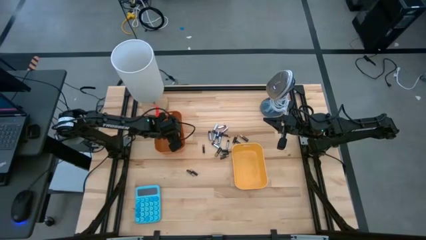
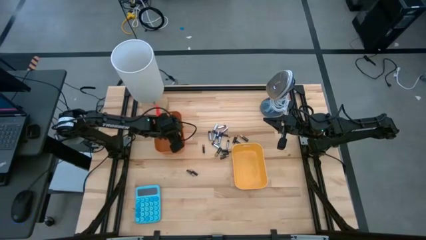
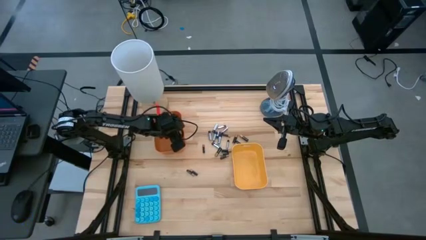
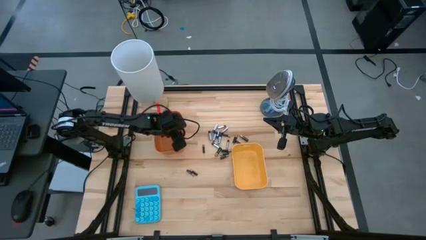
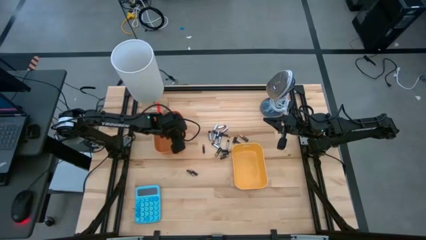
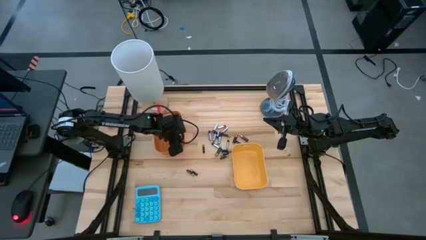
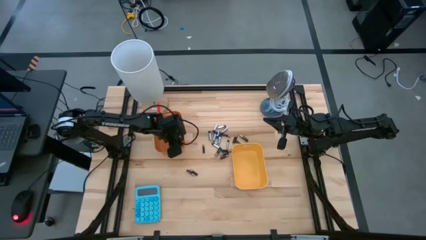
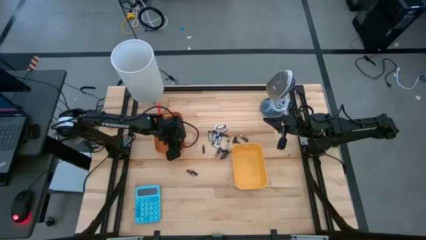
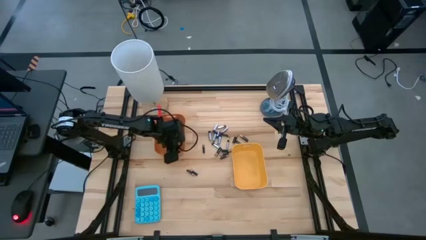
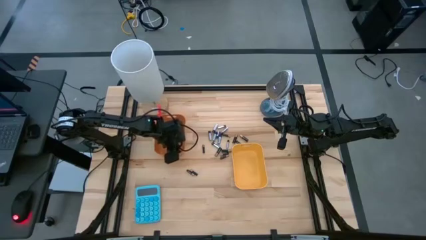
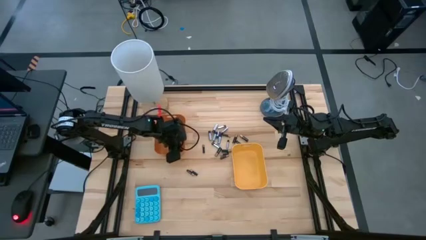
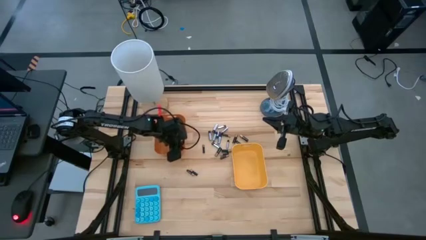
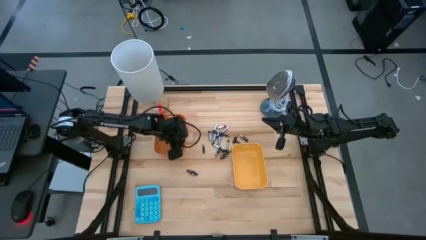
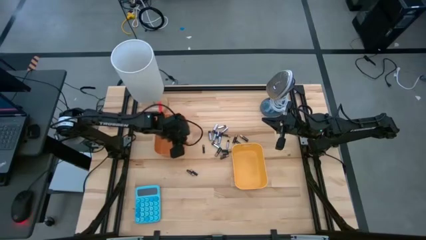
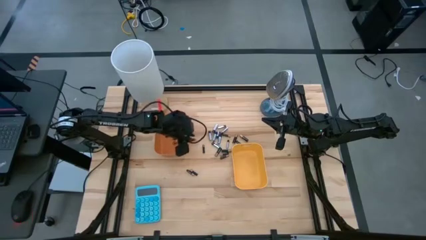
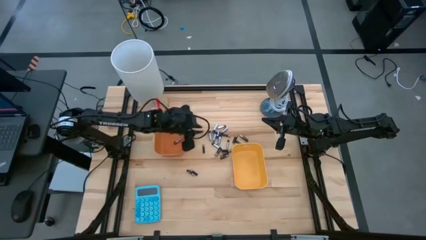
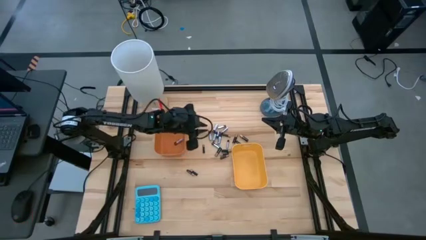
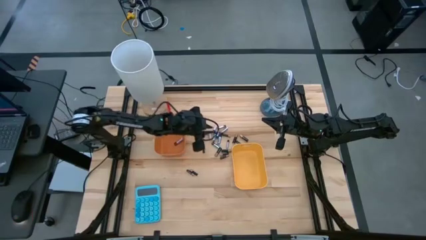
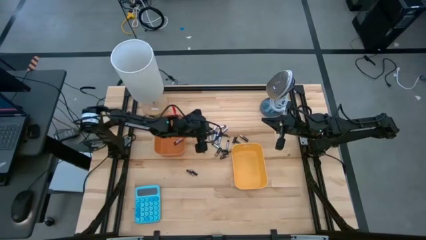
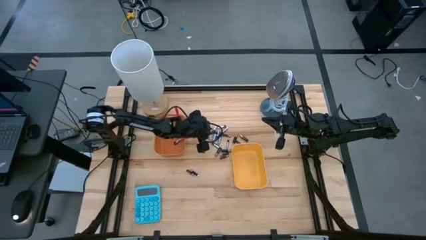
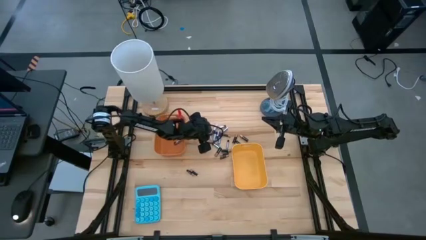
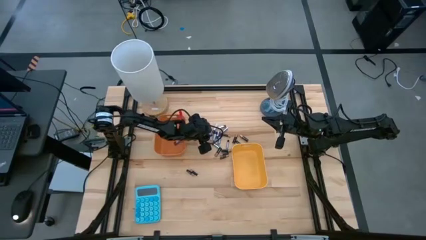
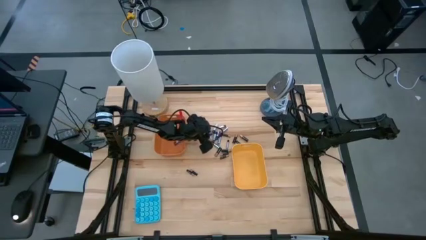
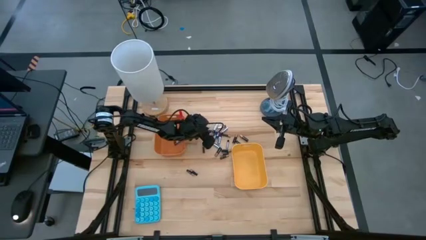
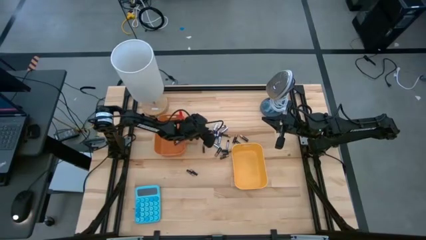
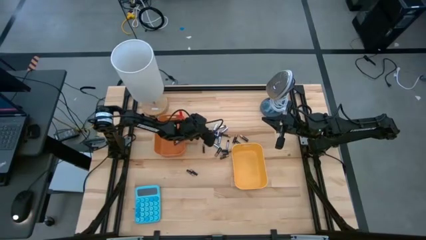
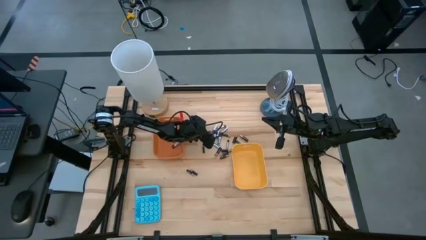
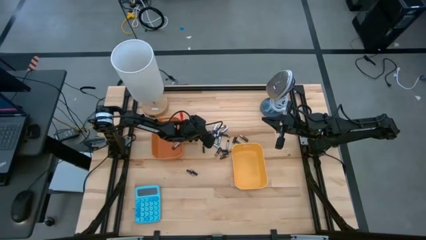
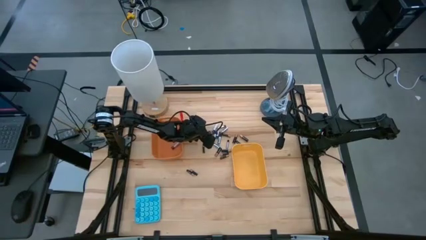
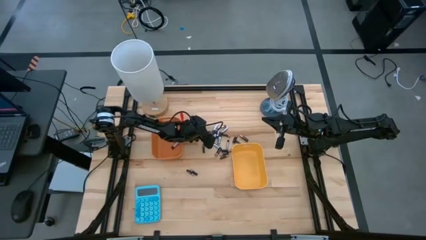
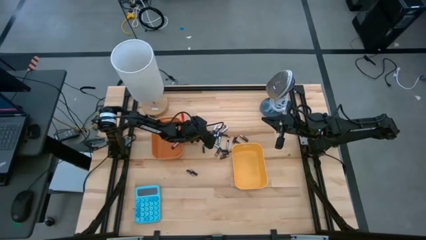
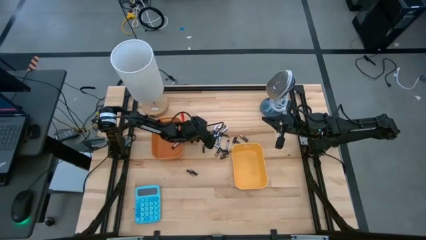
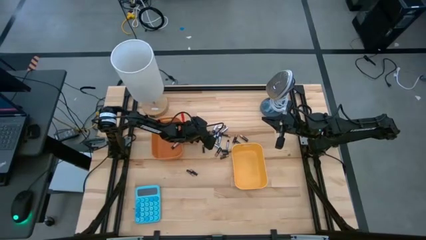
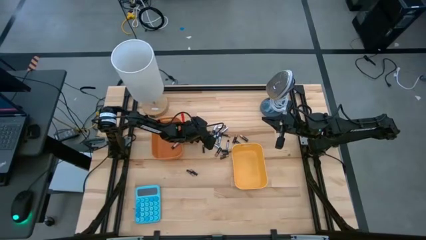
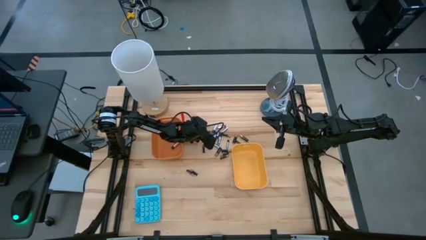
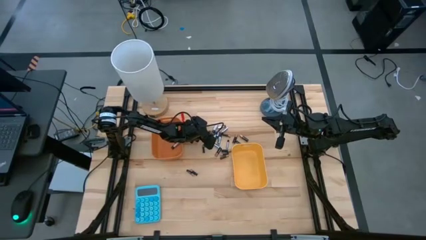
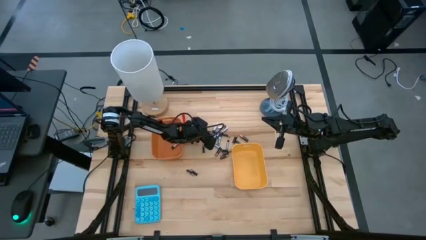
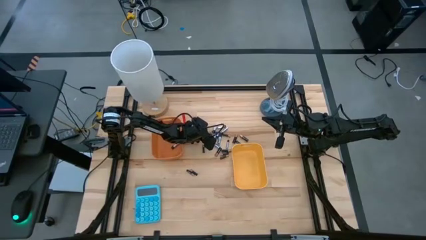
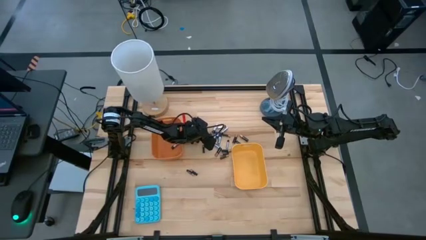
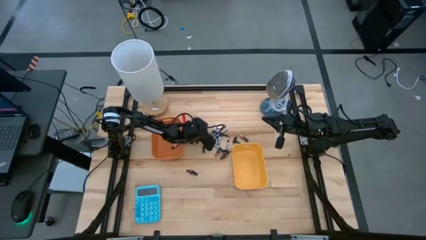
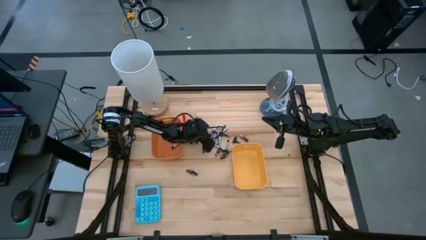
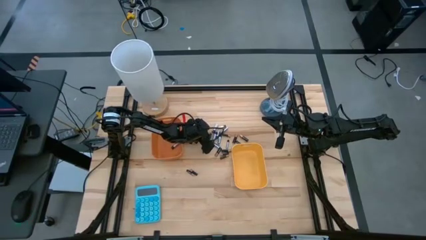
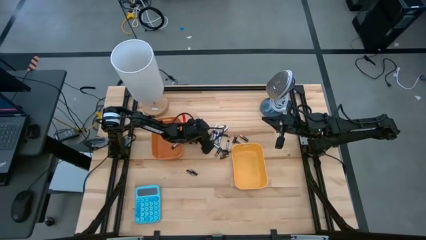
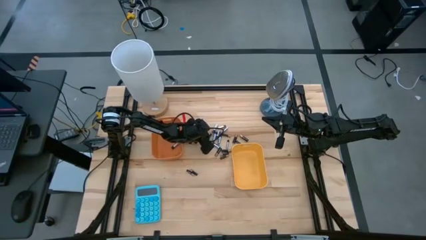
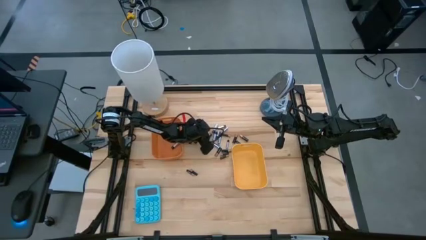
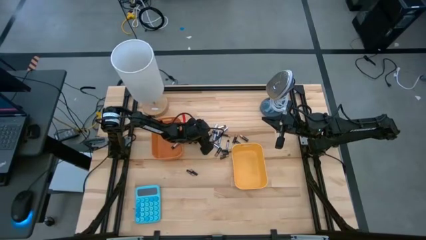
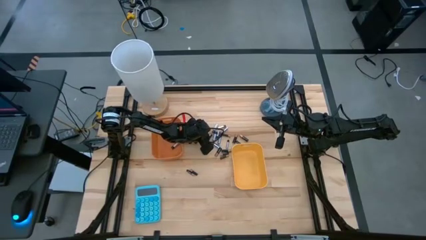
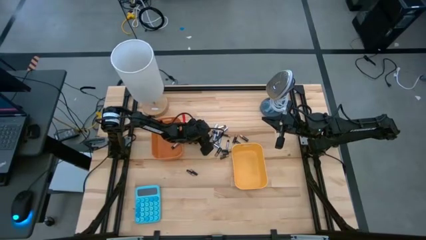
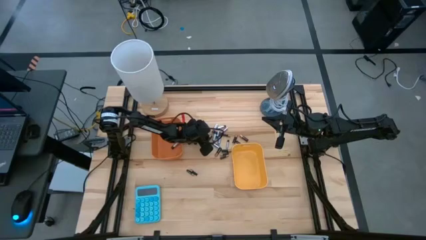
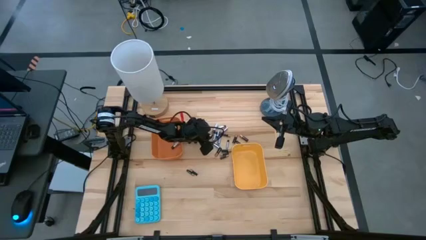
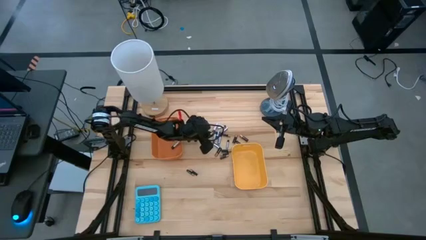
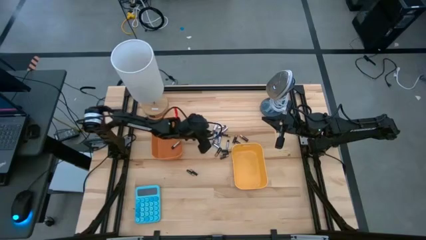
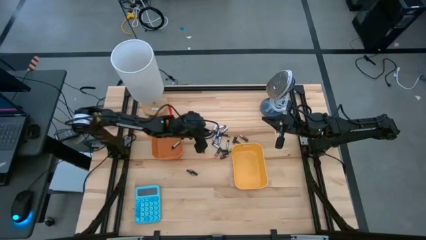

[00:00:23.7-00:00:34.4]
Task: Sort batteries
Put the silver battery into the orange bin

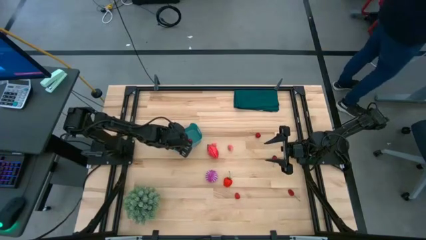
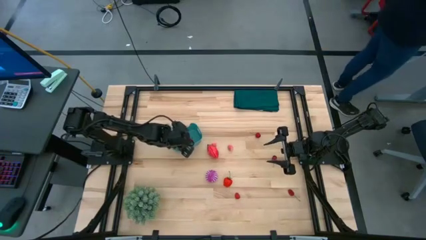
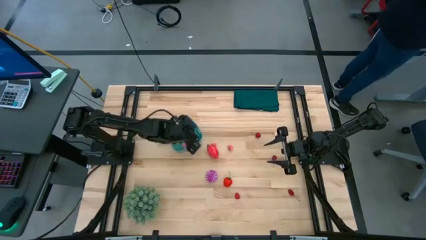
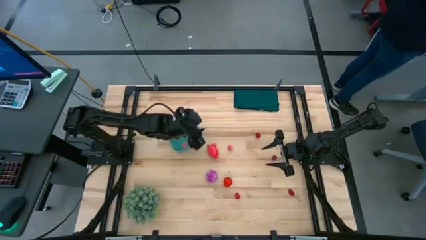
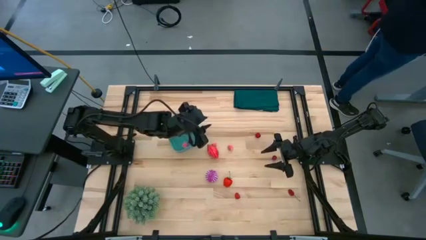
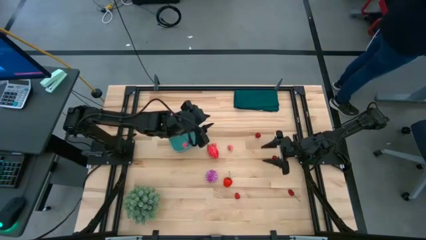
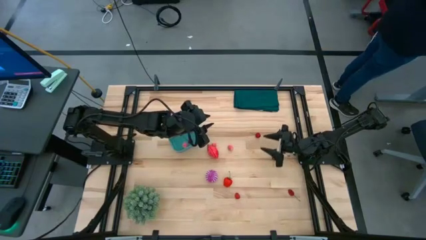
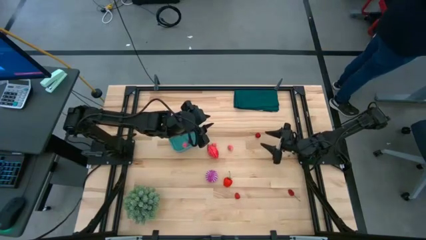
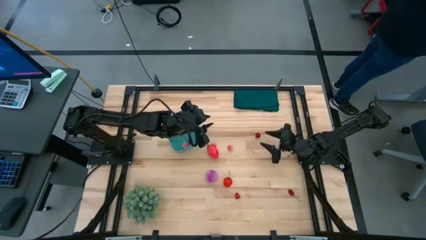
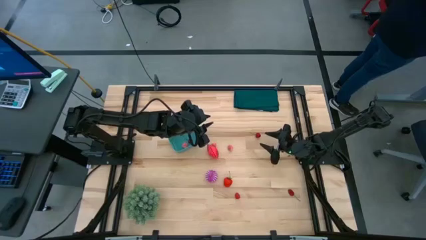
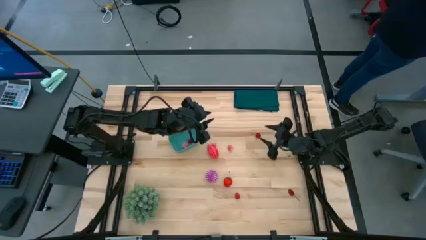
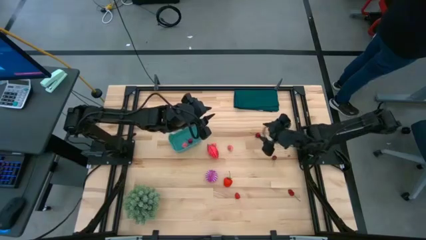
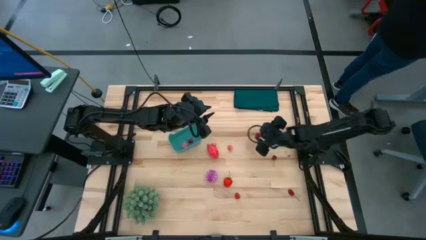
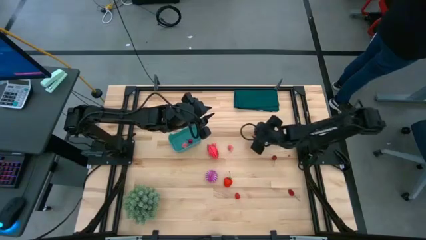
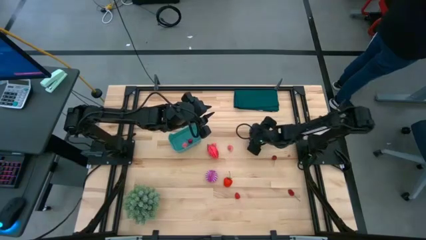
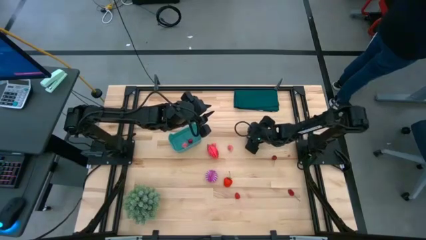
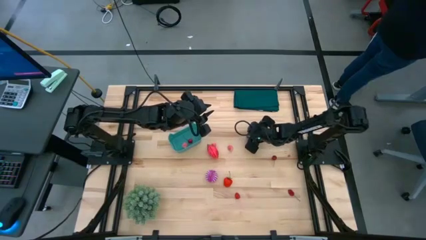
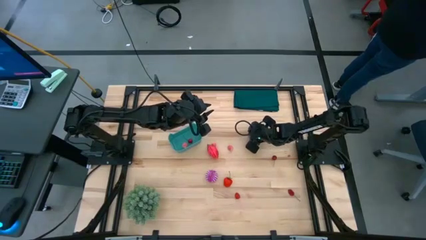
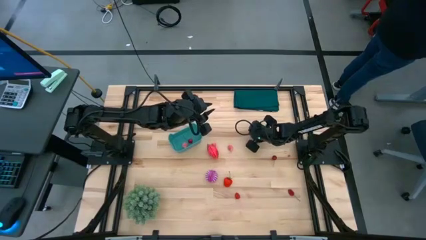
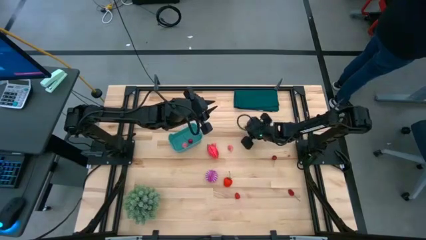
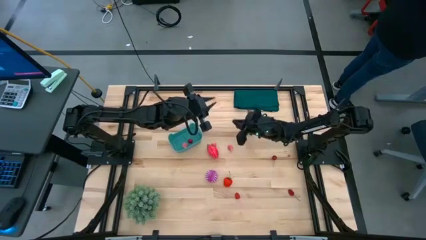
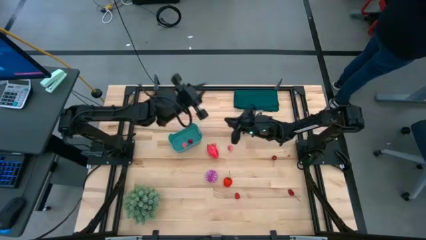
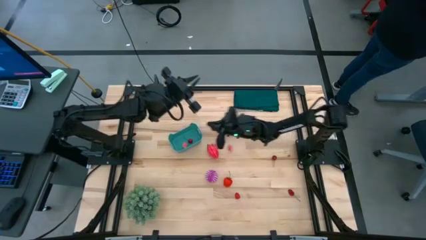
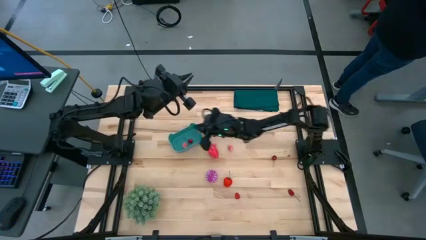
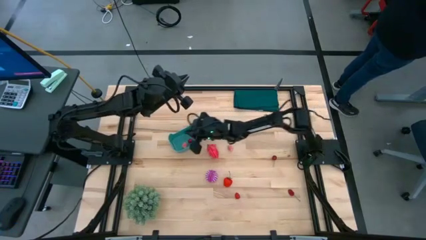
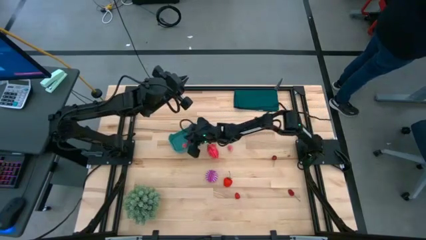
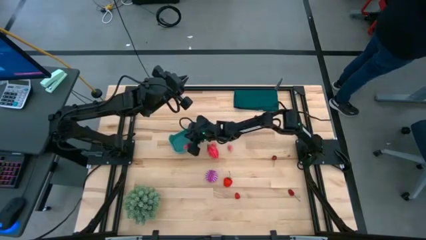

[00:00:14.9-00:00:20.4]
Task: Pick and placing Produce into tupperware
Put the red cherry into the blue bin
